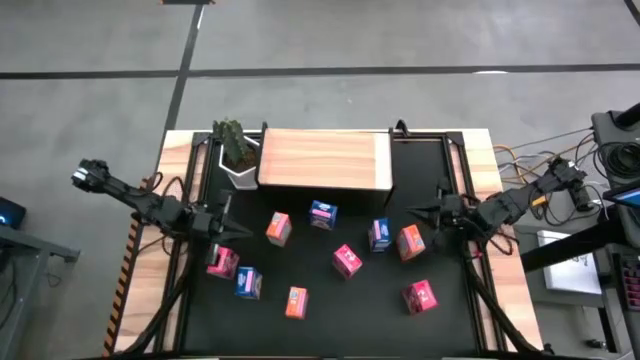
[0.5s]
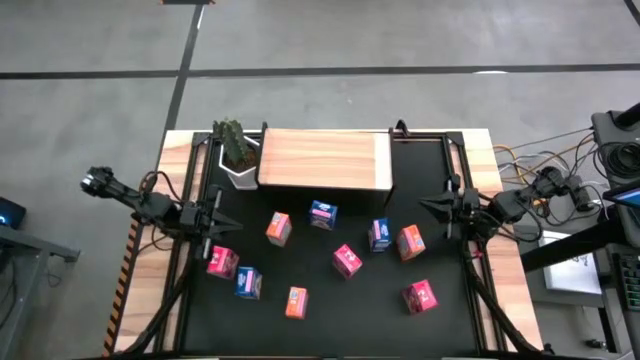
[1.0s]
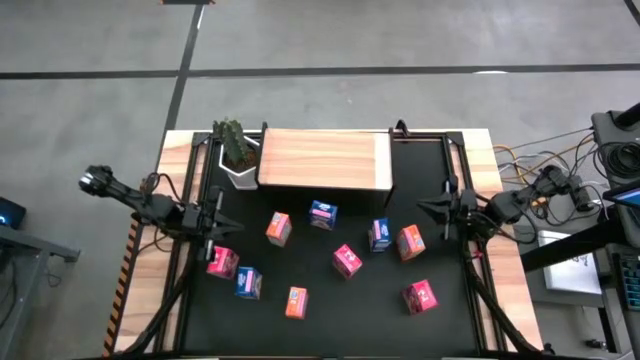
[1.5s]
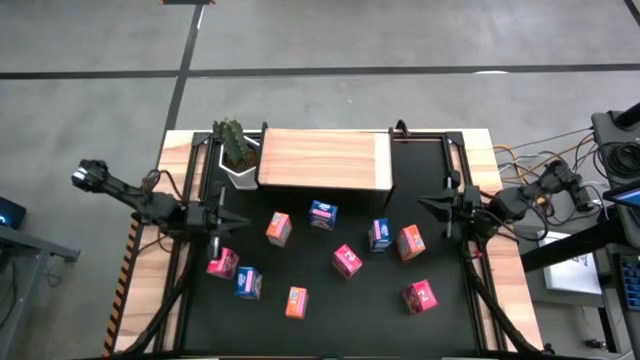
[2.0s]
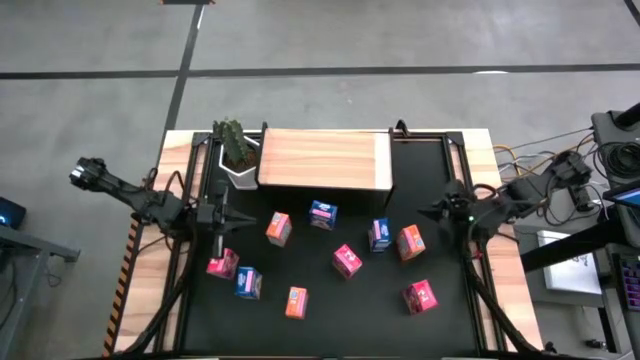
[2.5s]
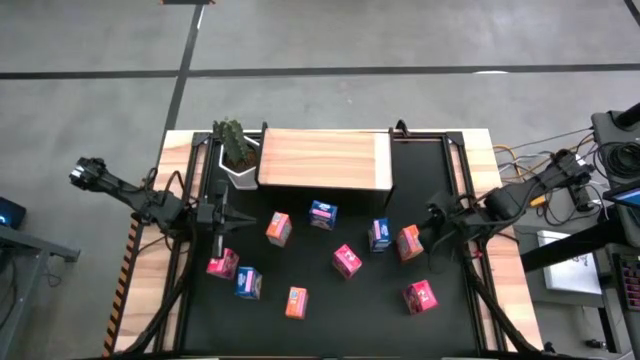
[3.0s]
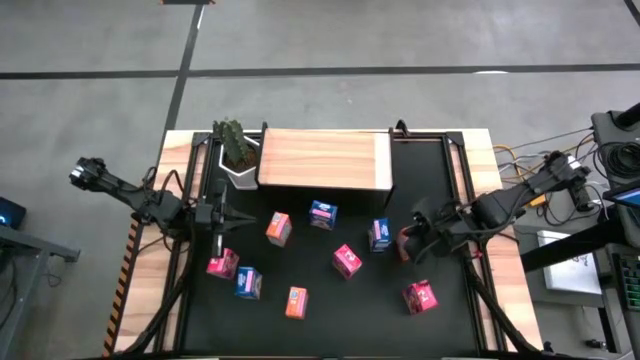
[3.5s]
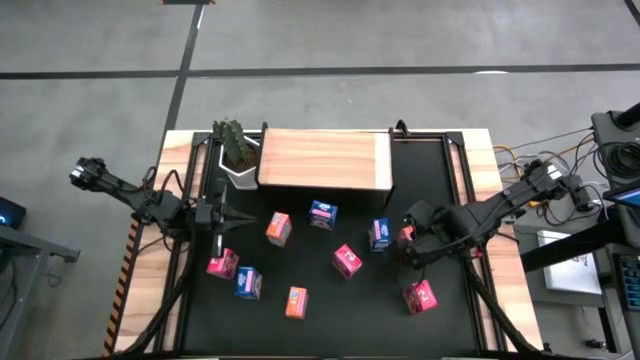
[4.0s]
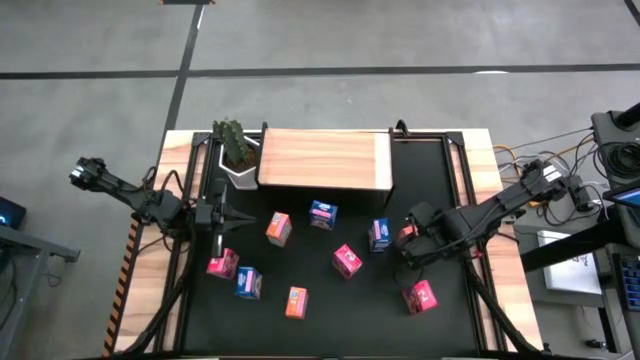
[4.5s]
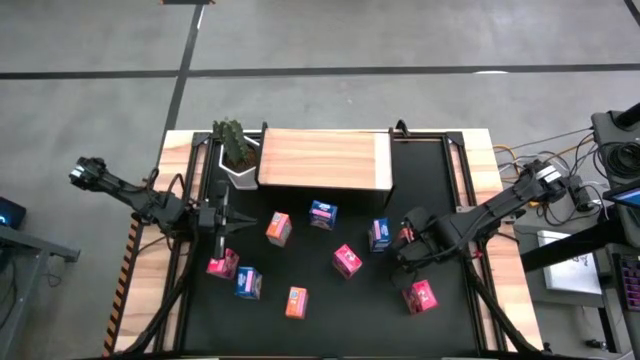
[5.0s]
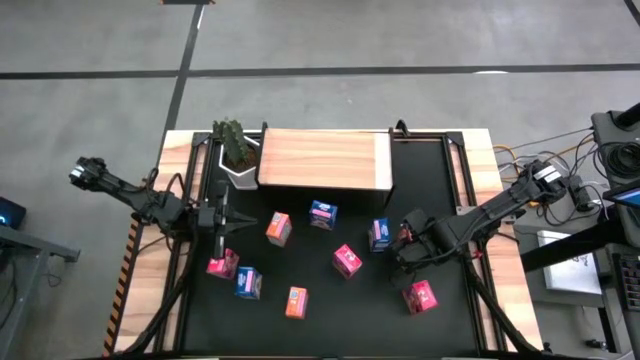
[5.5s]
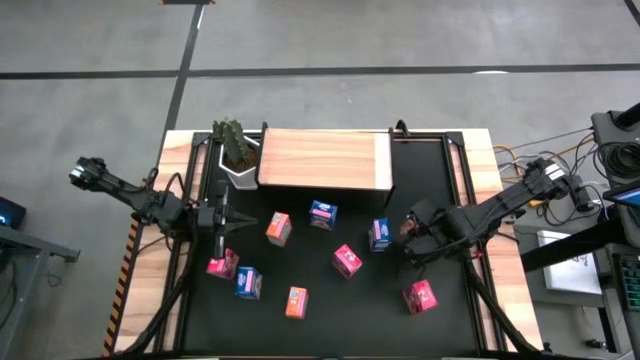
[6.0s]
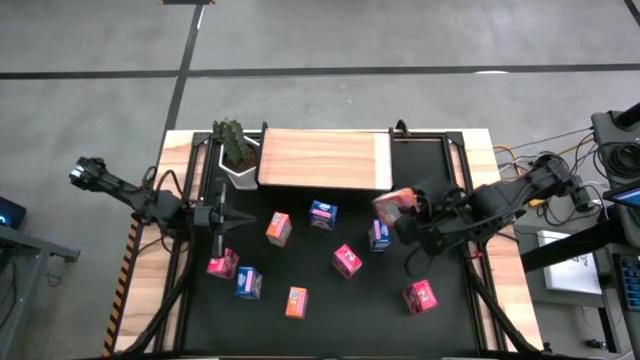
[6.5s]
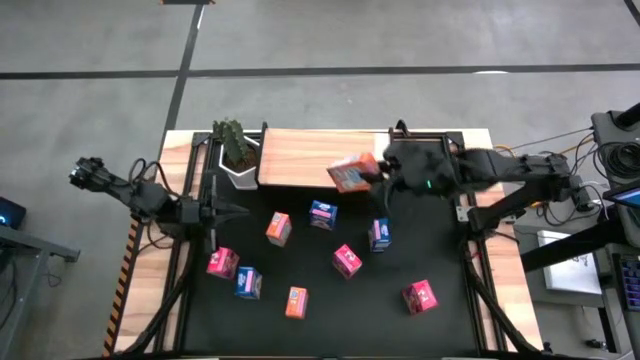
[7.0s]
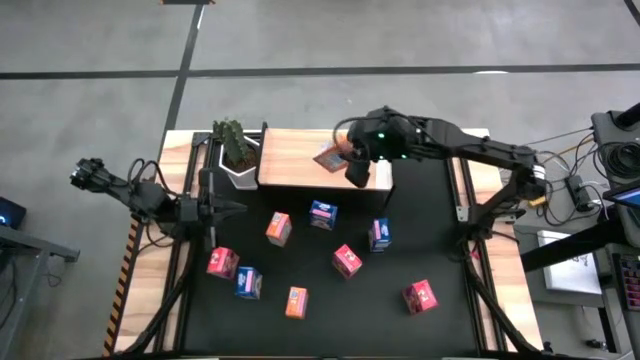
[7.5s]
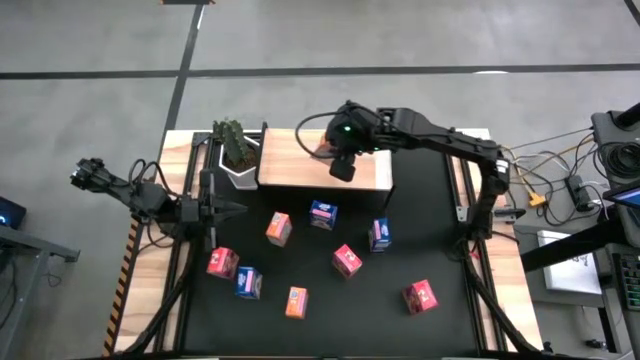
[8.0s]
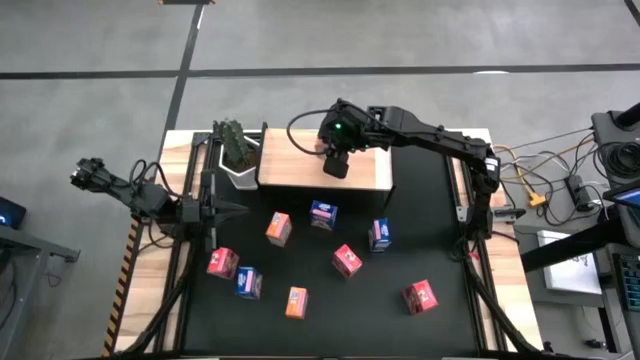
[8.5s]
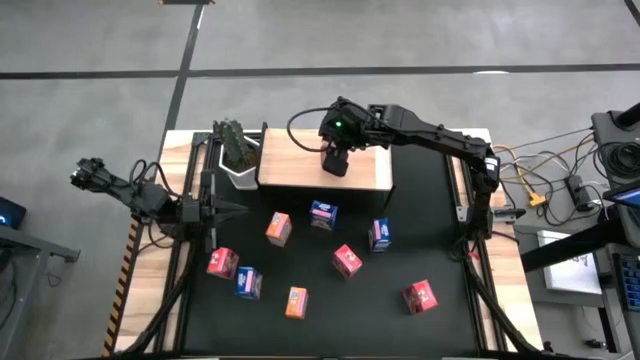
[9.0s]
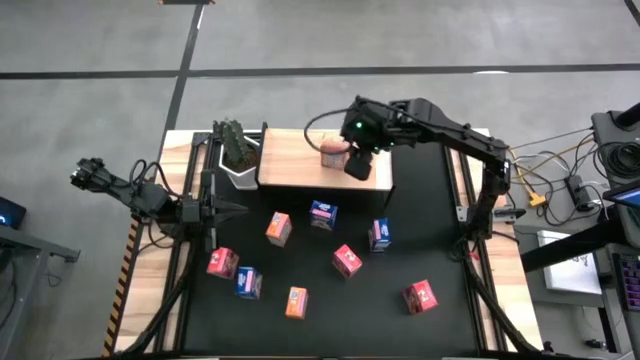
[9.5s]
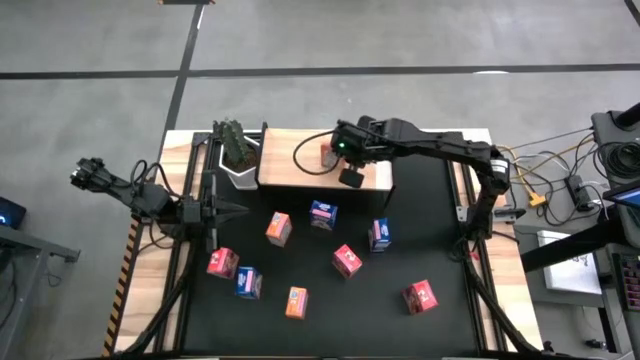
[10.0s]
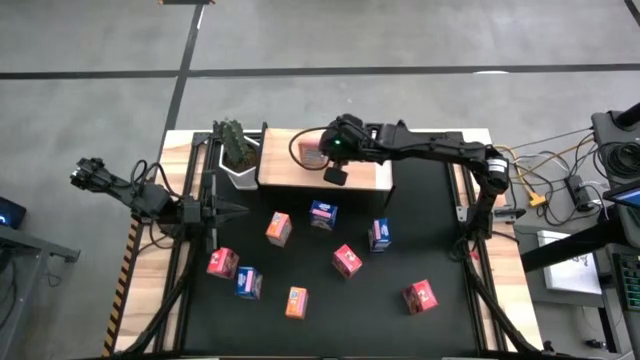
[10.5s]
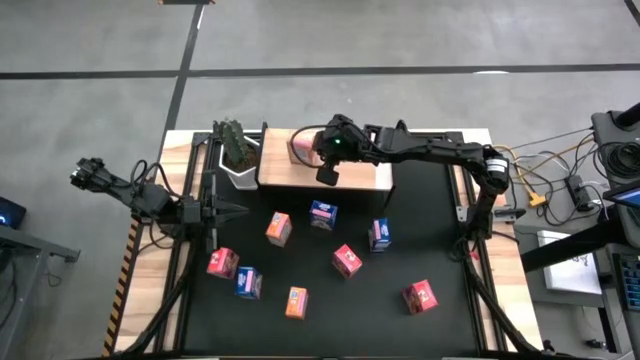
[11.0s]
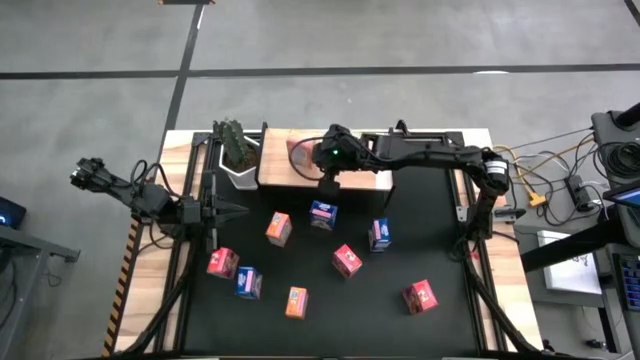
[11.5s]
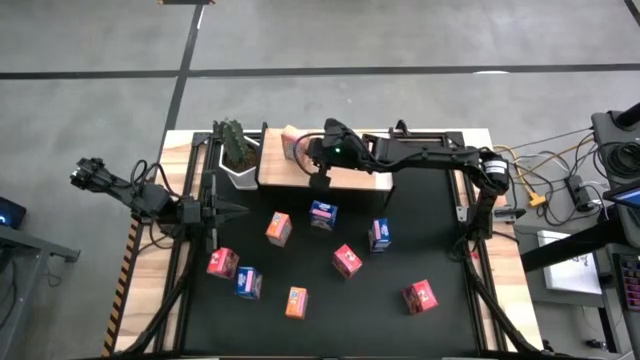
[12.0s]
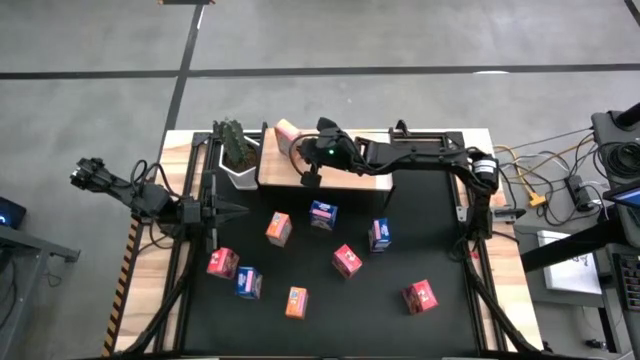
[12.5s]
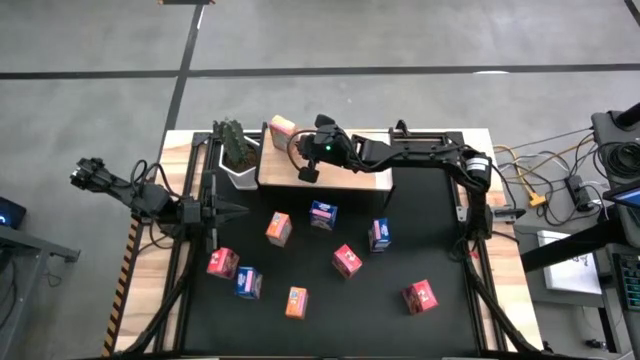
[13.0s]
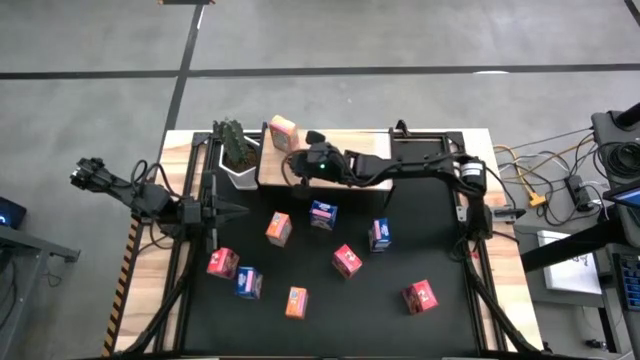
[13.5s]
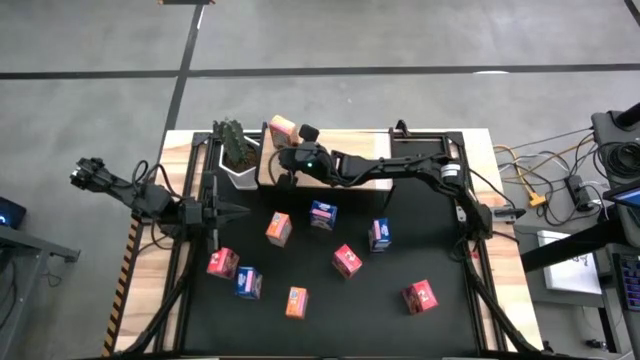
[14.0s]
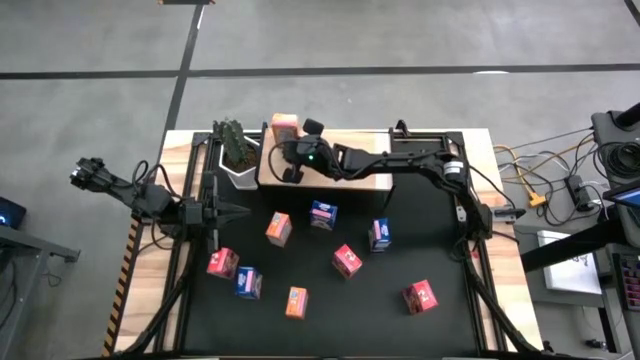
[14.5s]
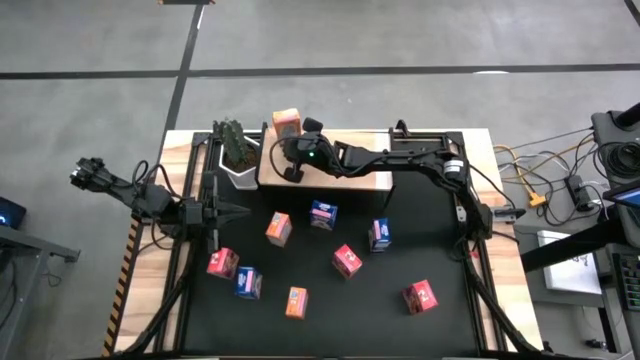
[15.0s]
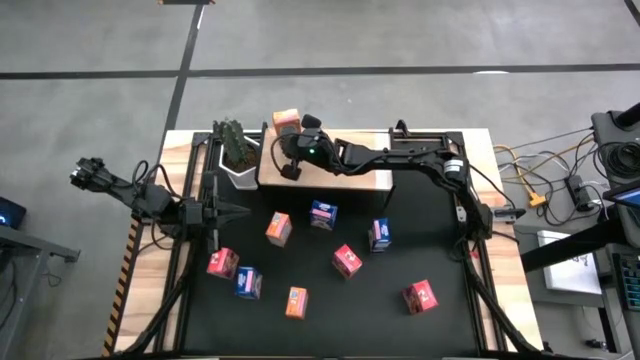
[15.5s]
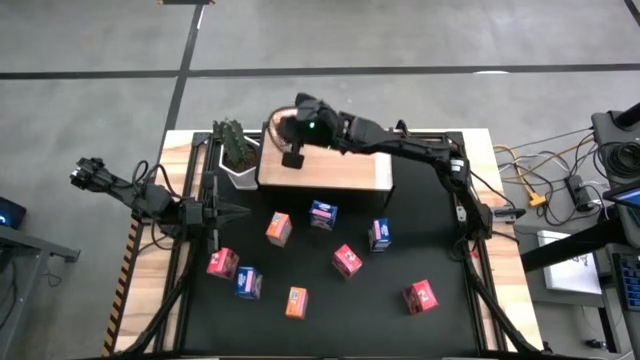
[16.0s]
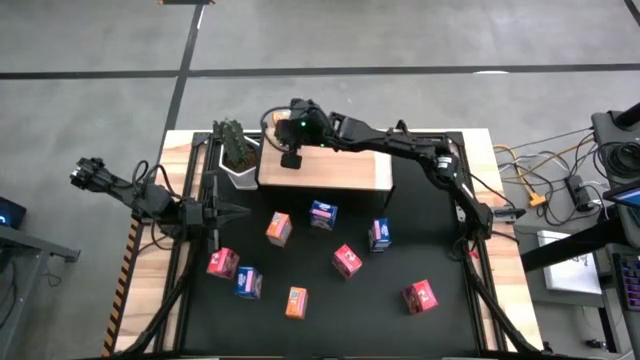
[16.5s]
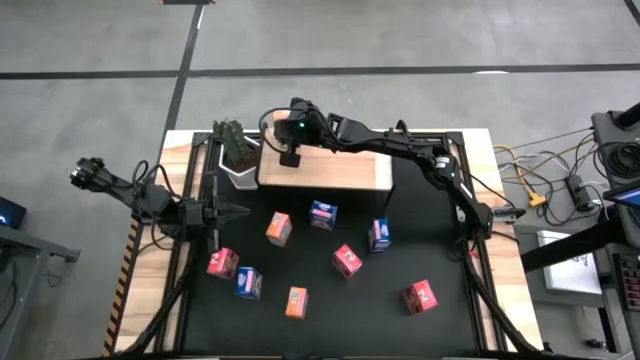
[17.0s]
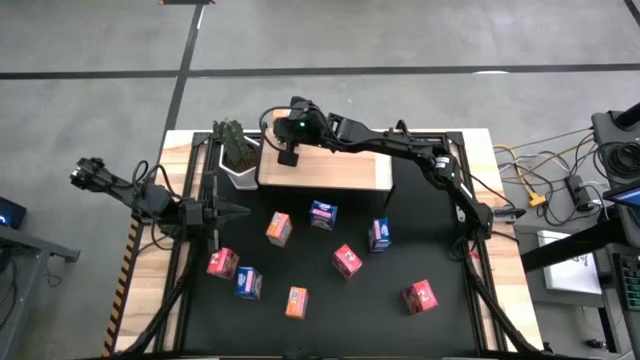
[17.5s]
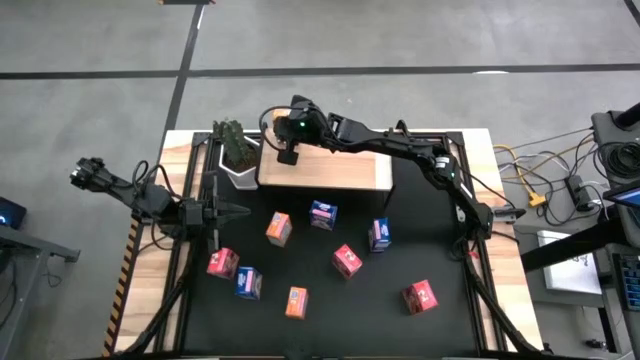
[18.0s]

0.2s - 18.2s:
Task: Stack cereal on shelf
Put the top right orange cereal box on the shelf
